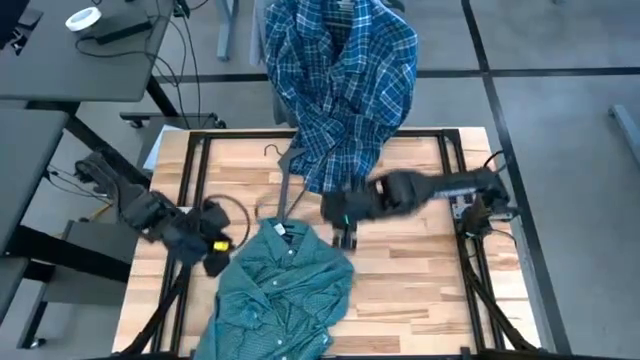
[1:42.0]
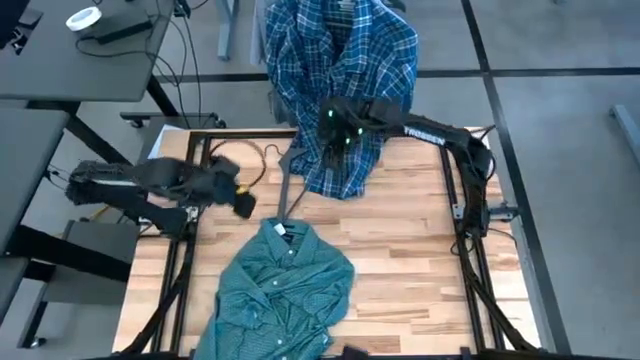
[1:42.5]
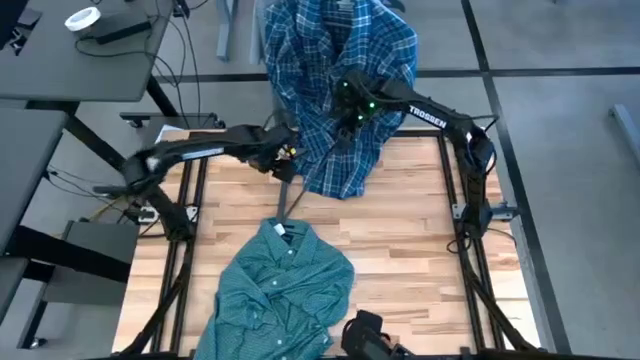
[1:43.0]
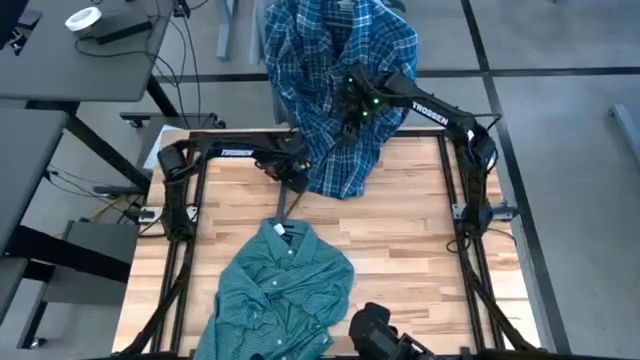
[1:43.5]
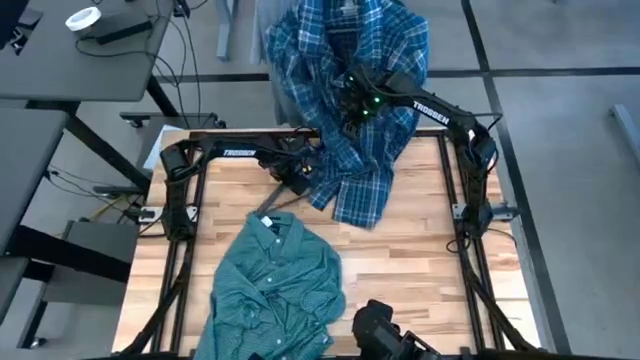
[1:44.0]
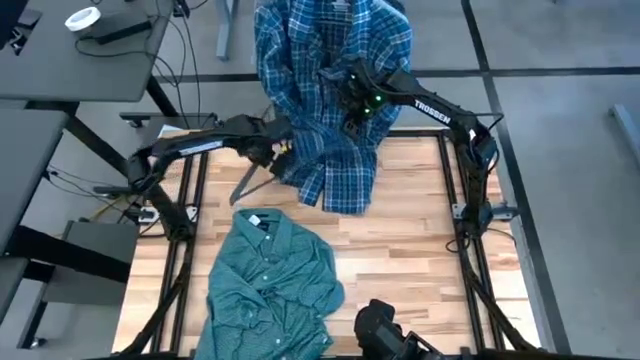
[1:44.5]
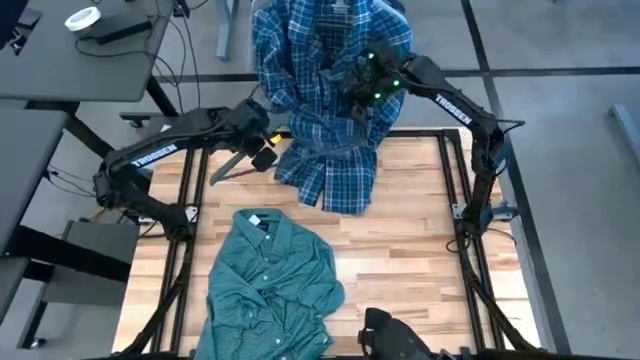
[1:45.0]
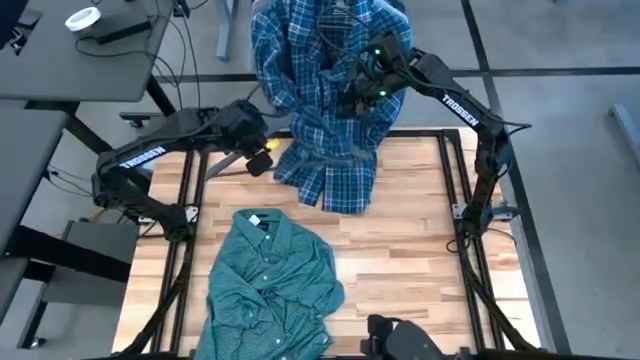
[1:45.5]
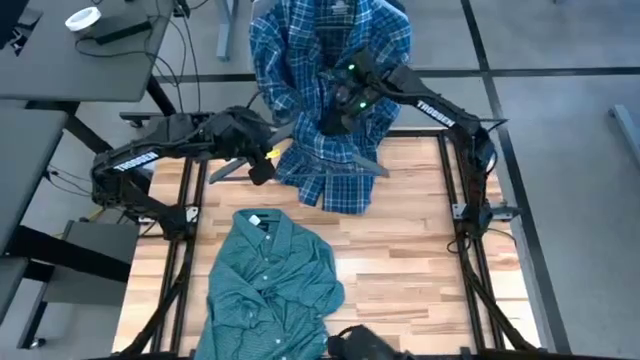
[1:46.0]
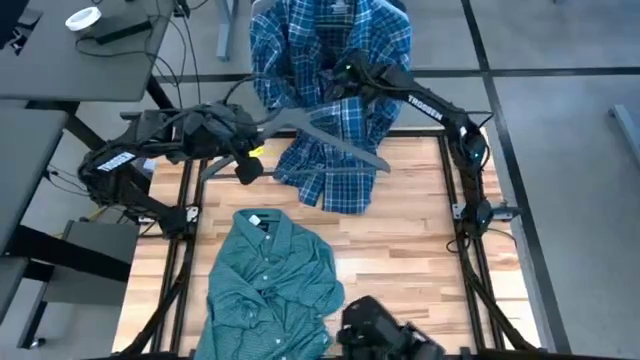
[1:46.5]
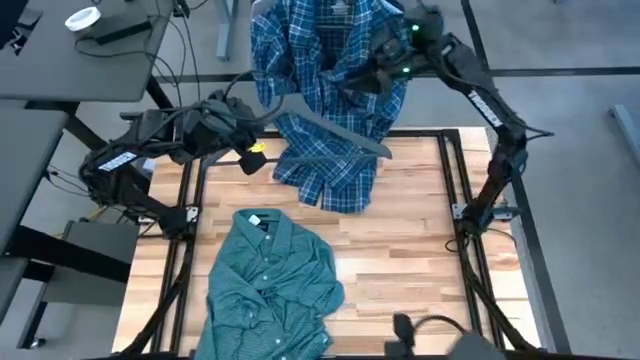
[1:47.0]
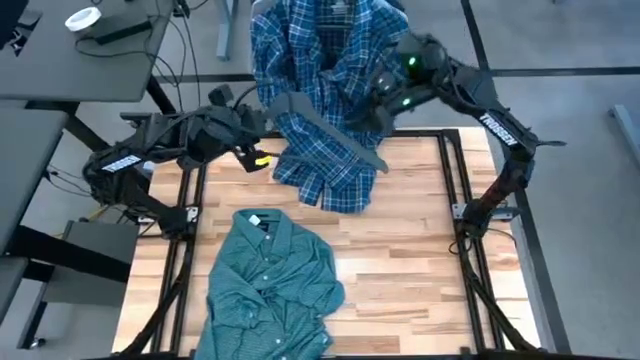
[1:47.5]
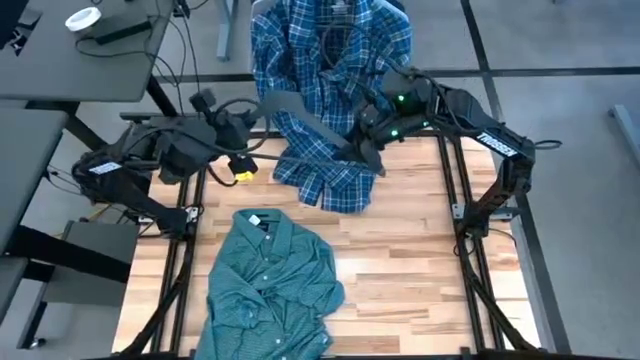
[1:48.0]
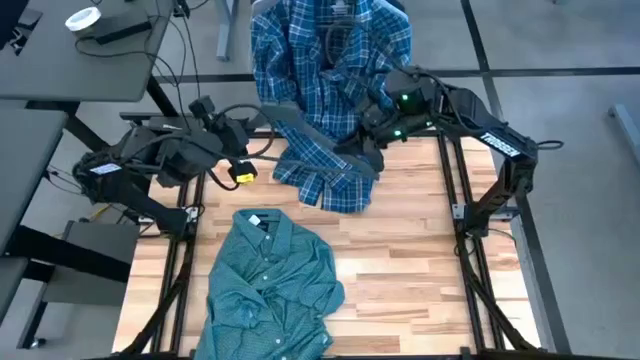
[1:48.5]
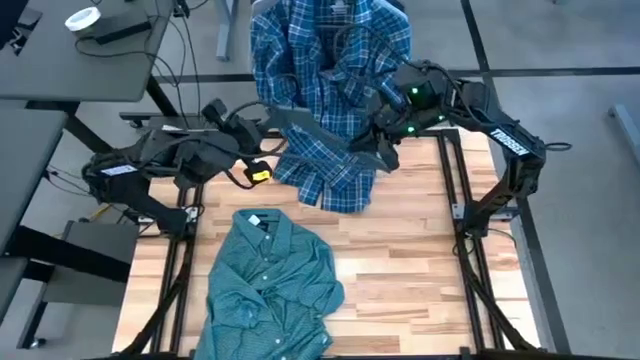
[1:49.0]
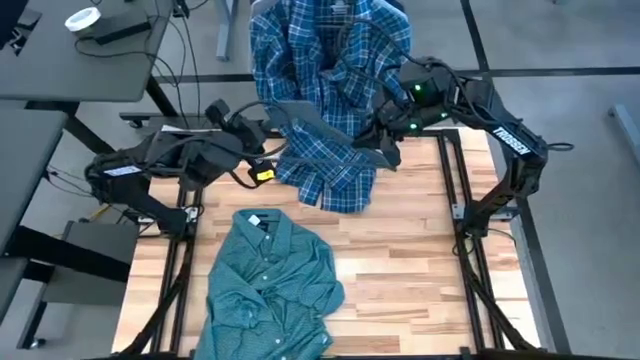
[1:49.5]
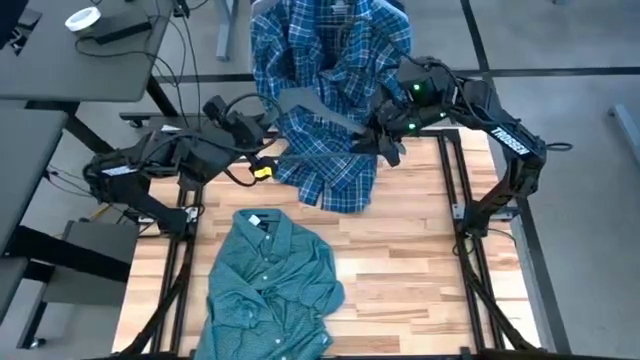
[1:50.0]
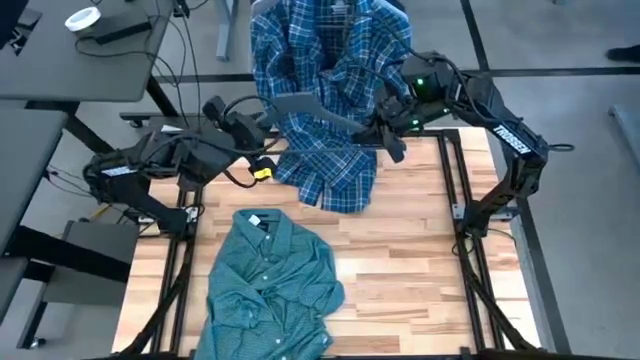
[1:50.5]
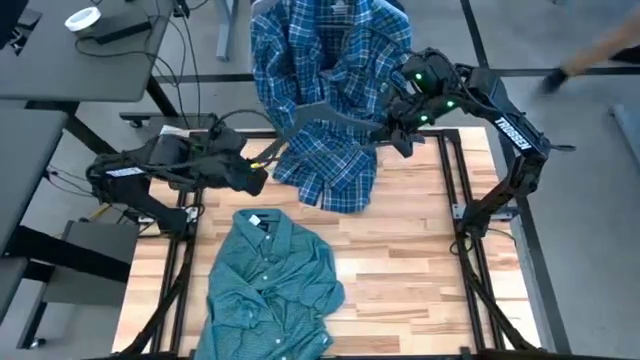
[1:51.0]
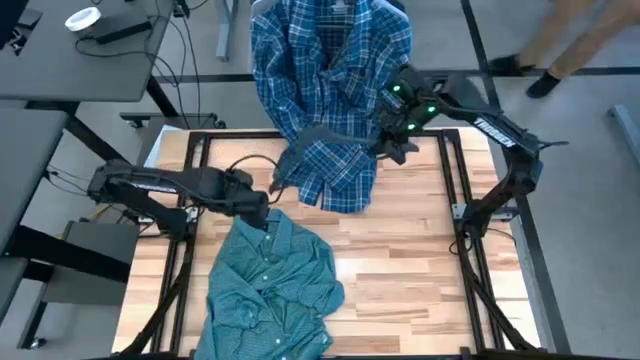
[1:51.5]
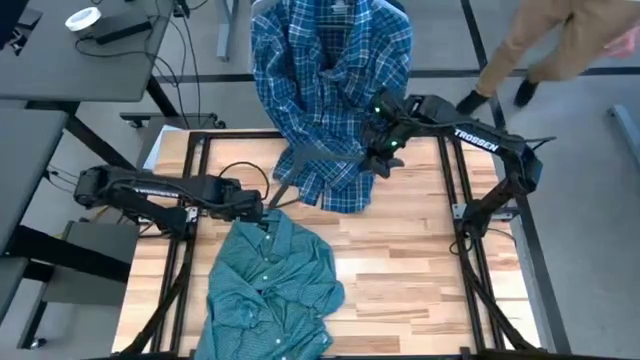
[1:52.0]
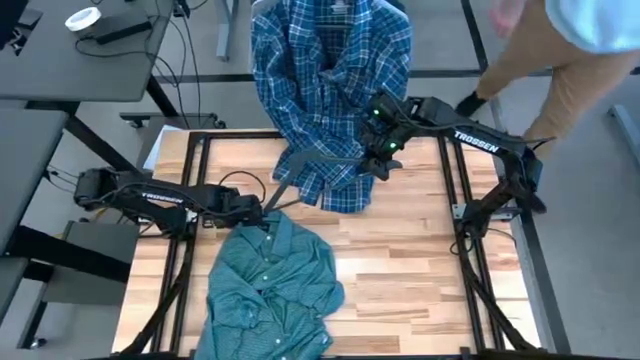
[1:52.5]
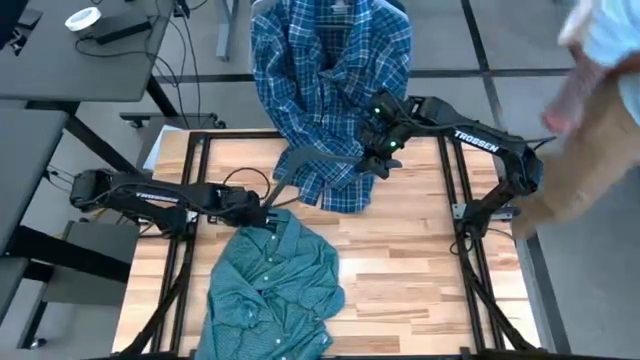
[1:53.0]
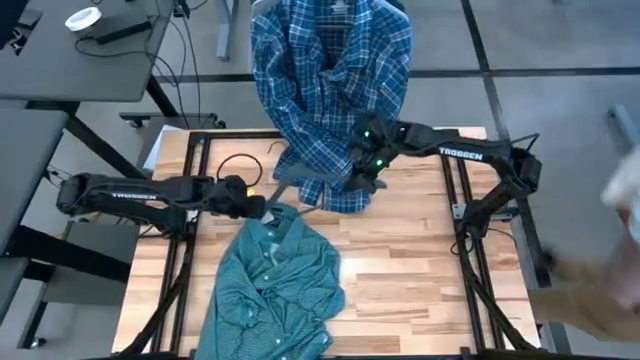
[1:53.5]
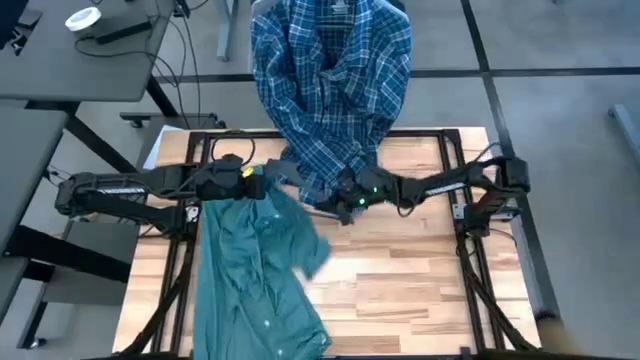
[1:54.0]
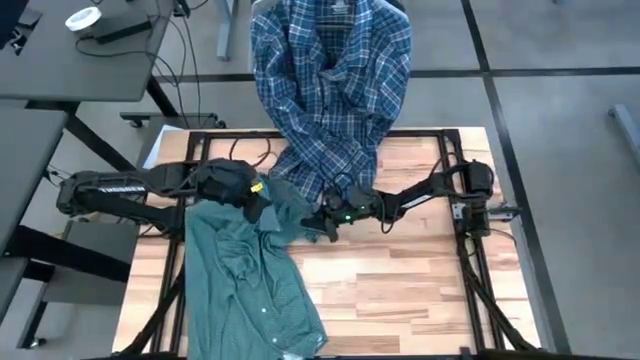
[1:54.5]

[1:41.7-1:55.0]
Task: Hang clothes
Put the green polo shirt on the gray hanger

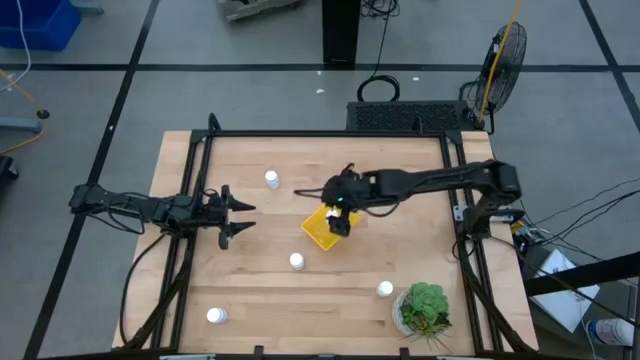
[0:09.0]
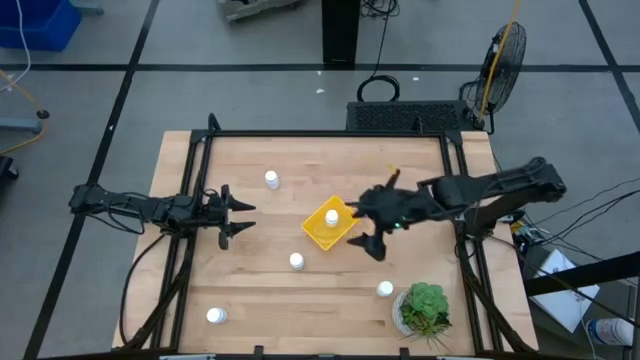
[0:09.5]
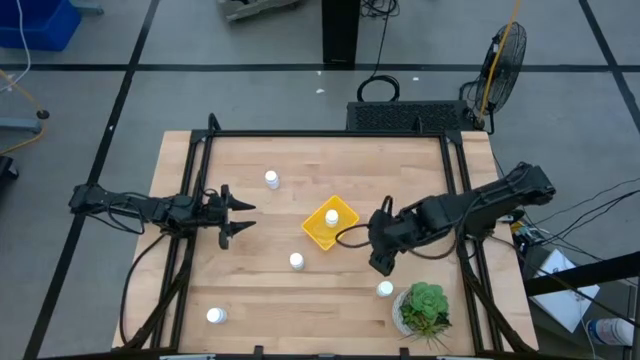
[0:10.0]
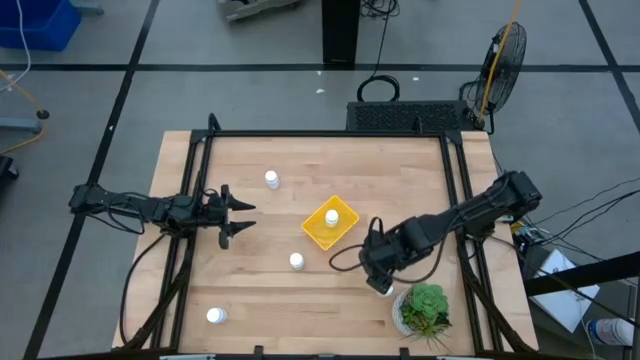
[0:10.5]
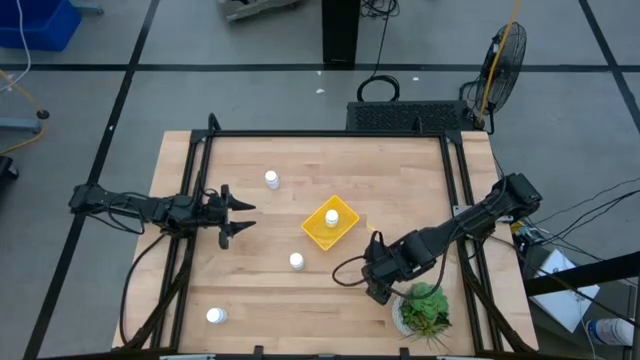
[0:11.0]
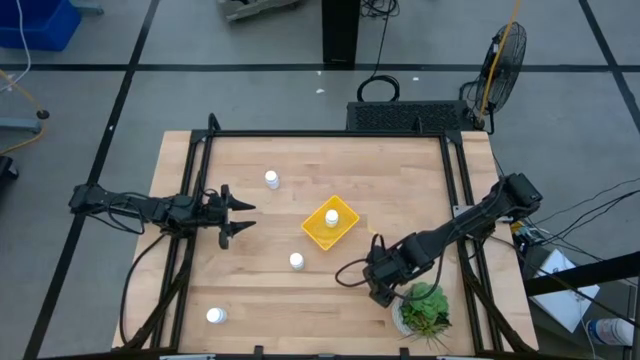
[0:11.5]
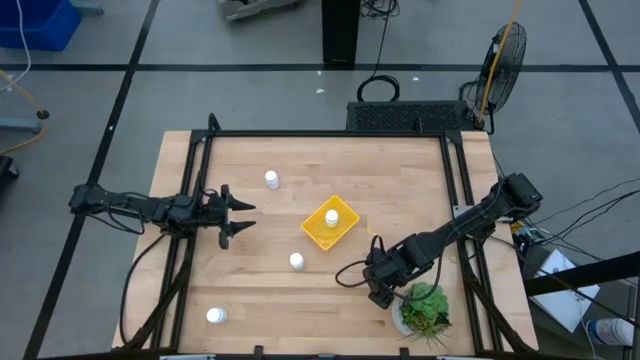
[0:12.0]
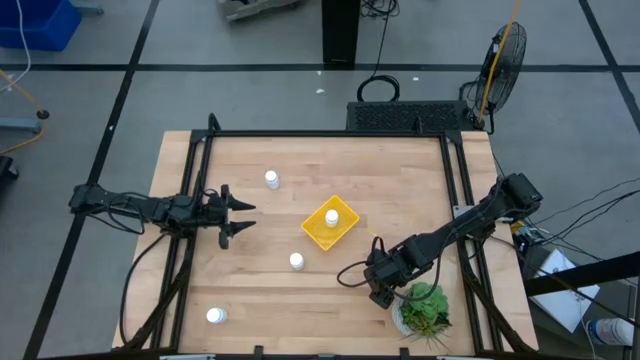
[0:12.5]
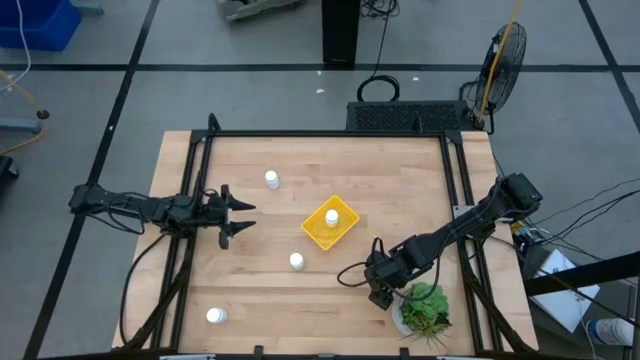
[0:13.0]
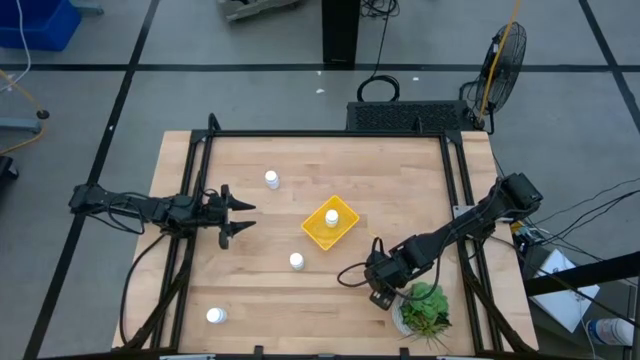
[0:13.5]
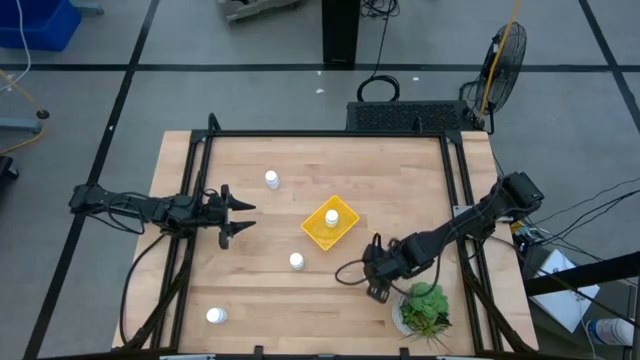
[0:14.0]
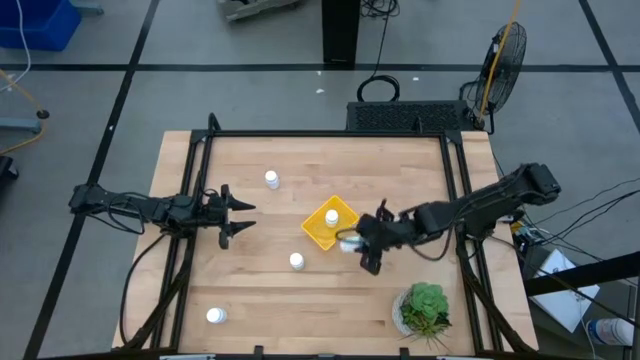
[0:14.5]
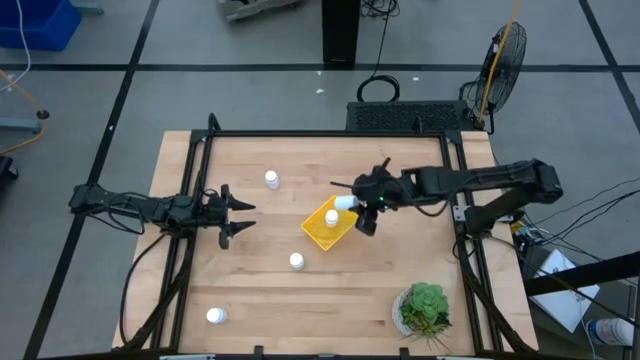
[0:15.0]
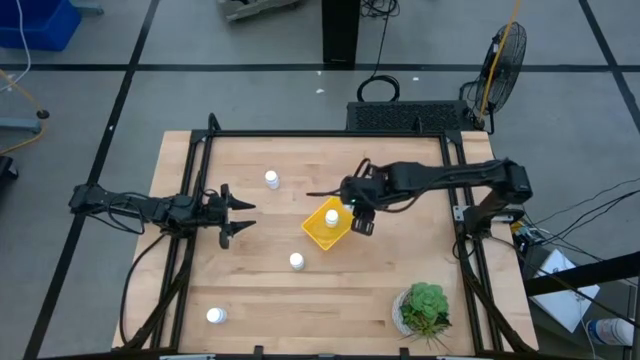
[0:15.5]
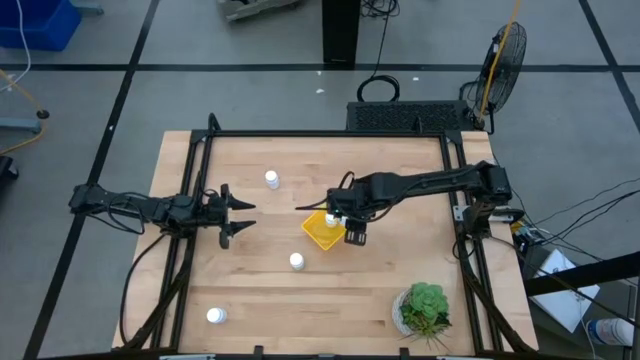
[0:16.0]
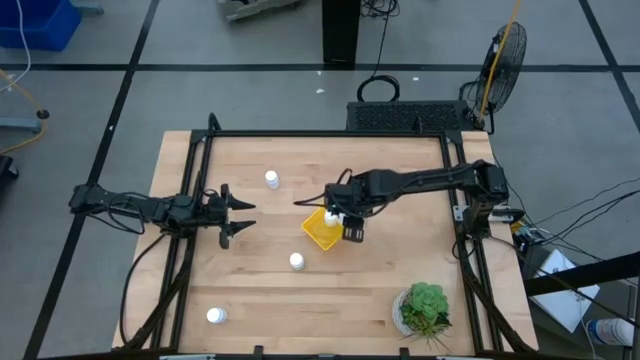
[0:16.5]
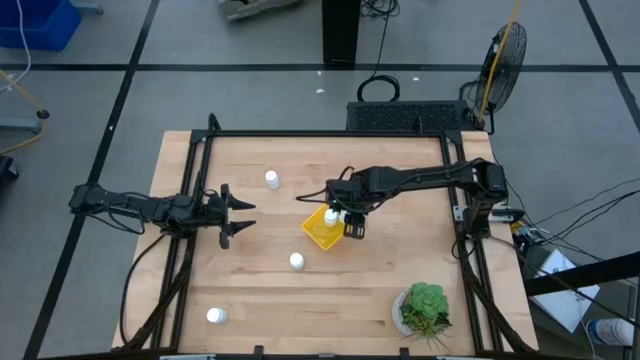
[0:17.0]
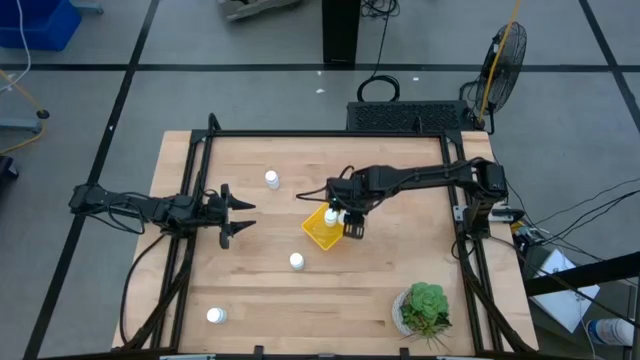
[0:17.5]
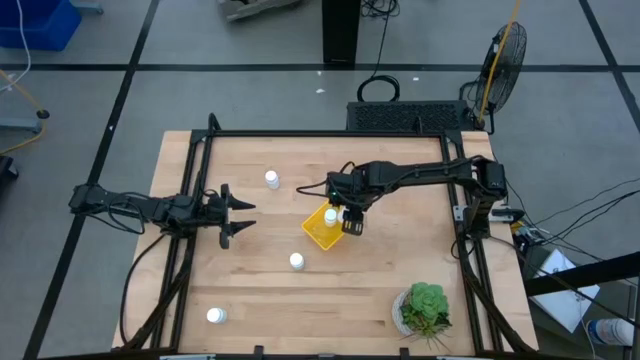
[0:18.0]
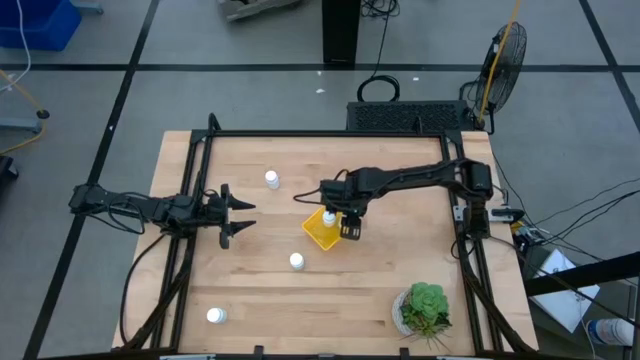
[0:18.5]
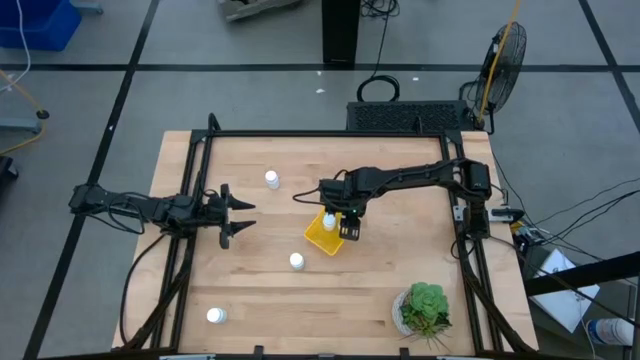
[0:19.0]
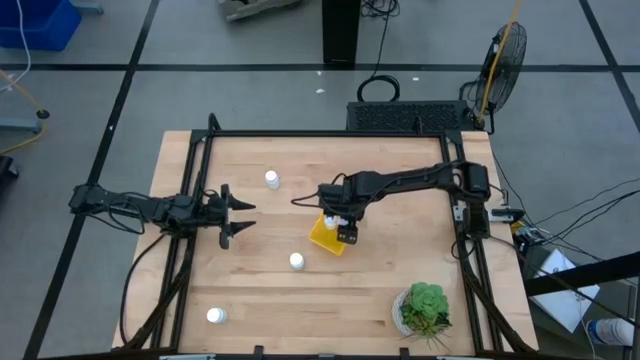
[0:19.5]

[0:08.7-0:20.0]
Task: Pick and place pill bottles into a basket
Put the white medicine bottle into the yellow bin
